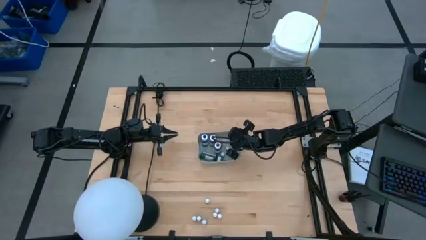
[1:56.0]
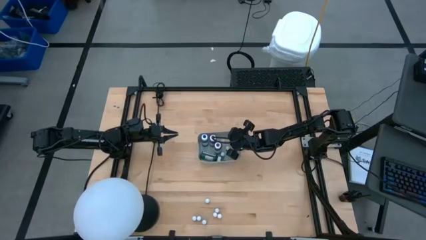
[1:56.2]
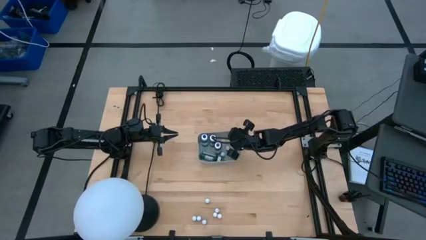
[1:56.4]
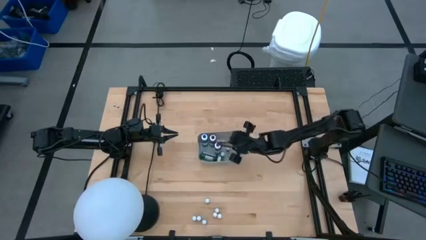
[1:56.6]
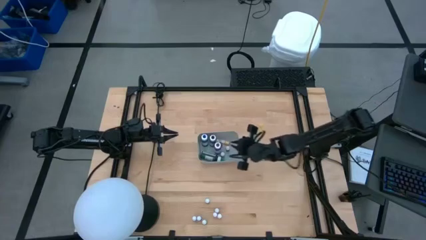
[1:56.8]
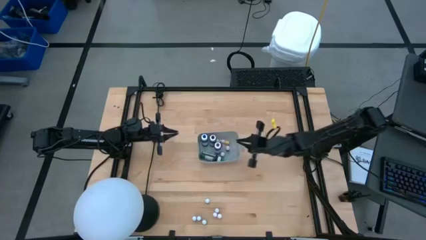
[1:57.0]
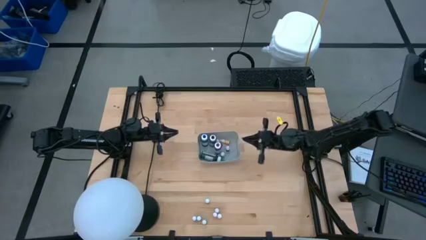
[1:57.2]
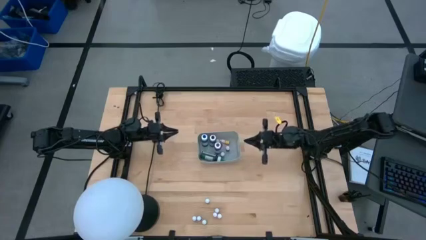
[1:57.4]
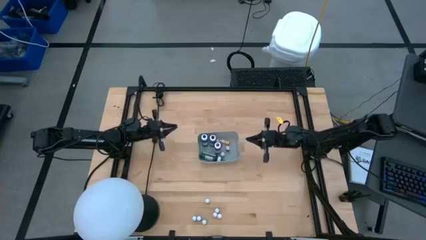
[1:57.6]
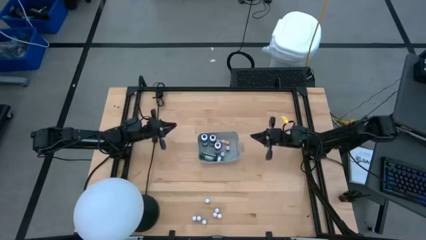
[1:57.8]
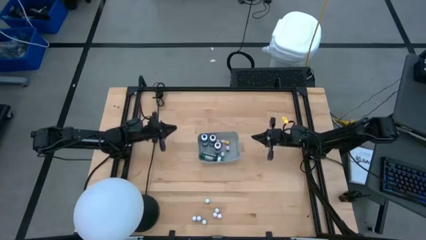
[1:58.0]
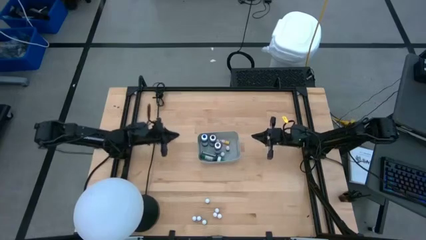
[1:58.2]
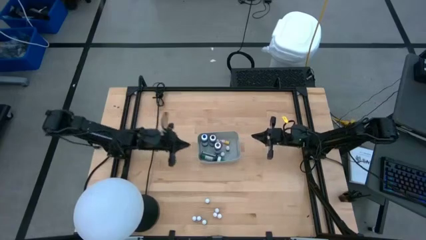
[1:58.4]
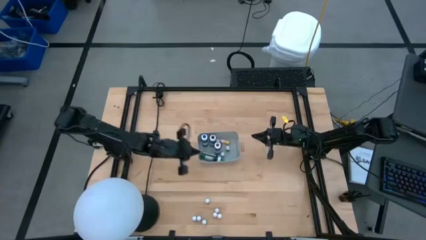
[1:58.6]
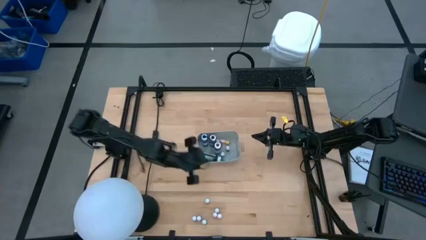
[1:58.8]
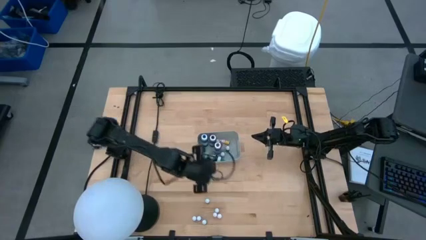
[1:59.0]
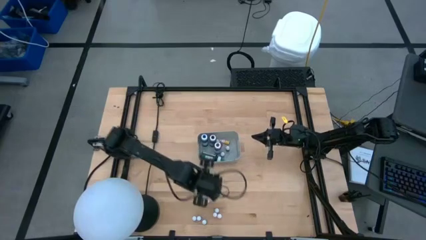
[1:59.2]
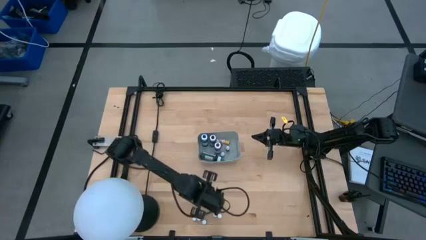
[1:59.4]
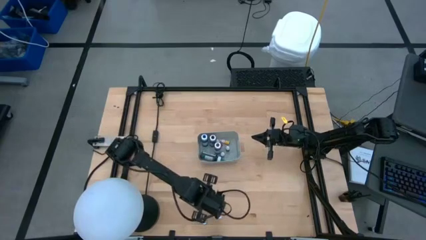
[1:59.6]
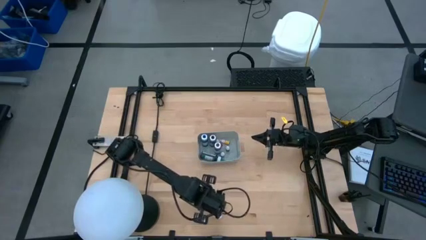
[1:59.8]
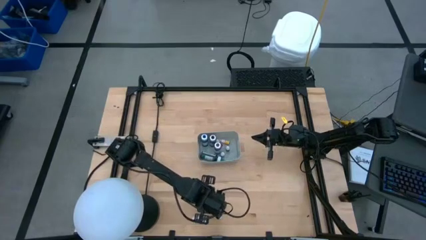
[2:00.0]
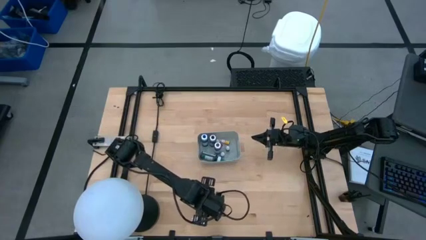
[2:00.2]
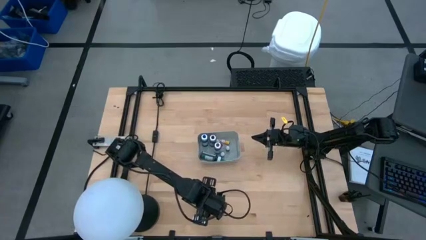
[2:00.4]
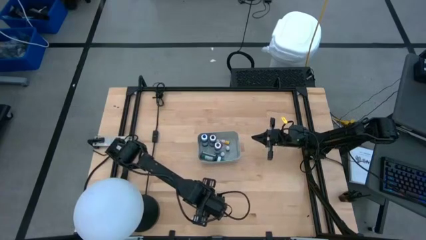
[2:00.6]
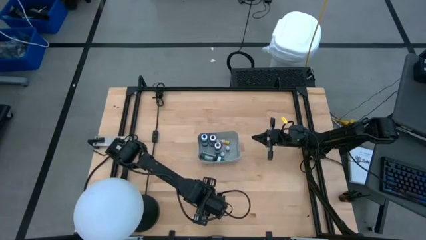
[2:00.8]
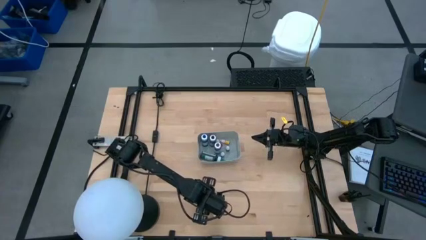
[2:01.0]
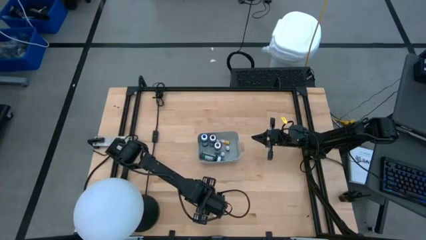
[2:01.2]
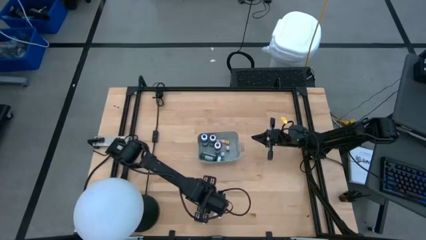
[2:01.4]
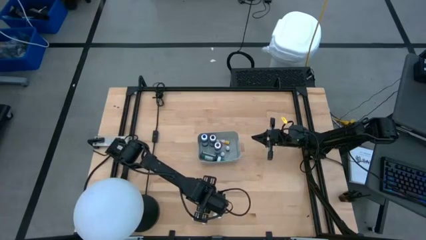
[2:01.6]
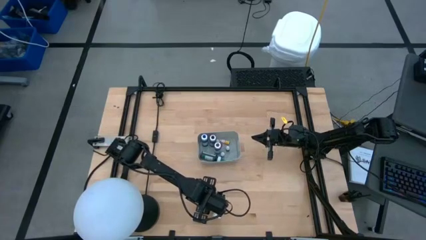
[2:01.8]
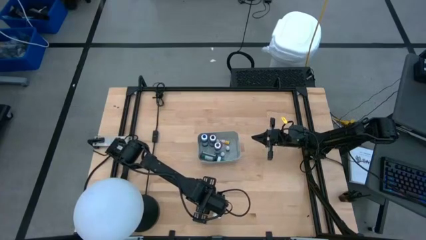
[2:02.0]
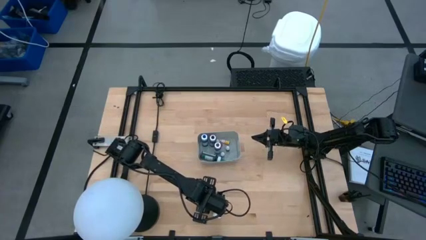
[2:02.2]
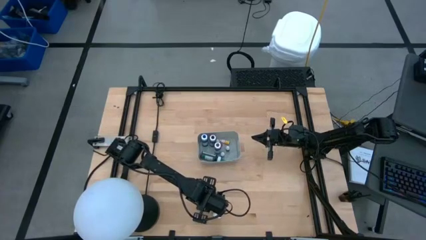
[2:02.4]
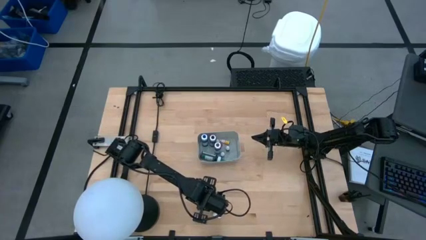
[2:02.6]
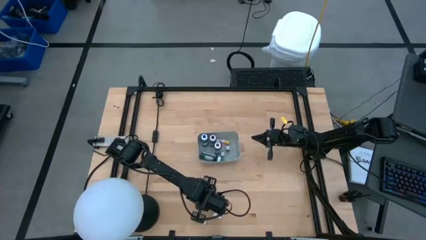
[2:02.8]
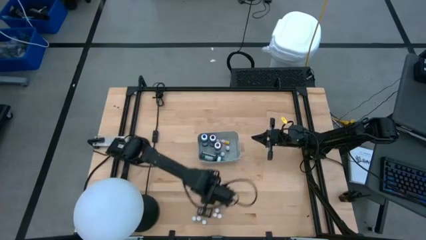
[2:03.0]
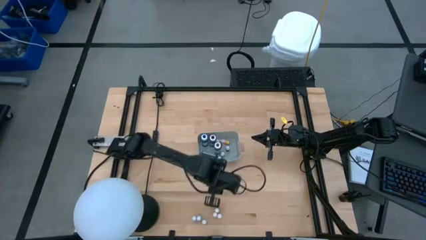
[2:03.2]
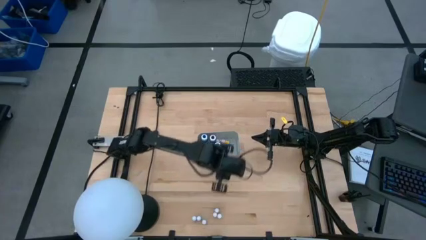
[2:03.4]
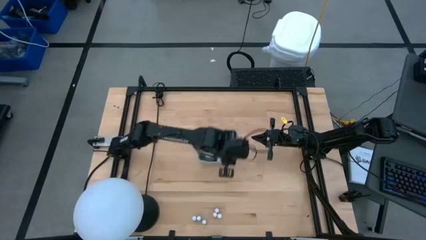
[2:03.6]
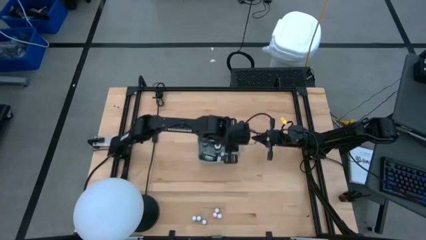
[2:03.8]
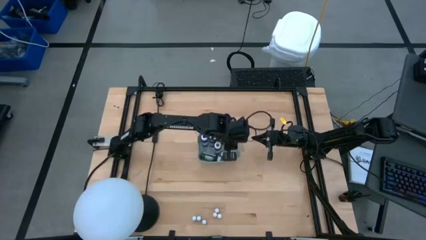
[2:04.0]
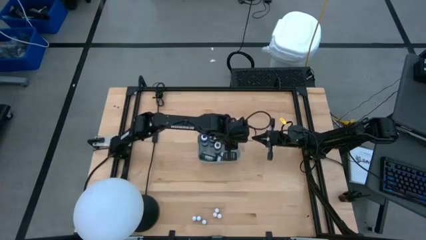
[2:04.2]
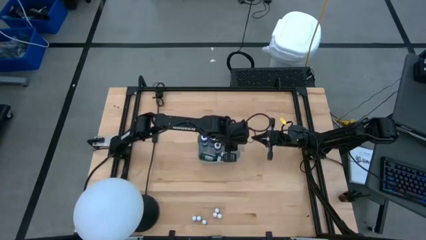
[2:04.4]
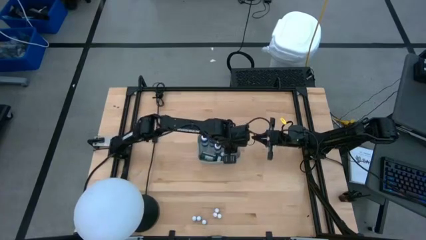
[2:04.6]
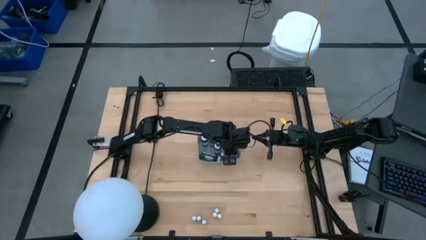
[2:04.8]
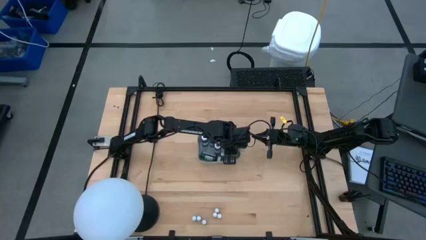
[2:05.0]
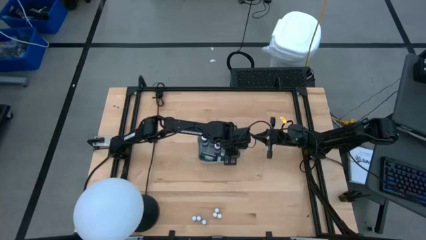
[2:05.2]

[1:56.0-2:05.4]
Task: Pick & Place food coloring
Put the small purple food coloring bottle into the gray bin

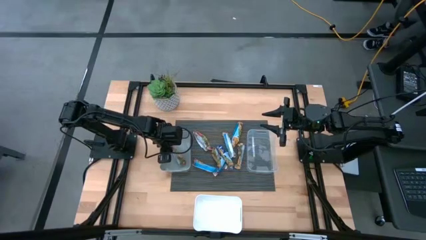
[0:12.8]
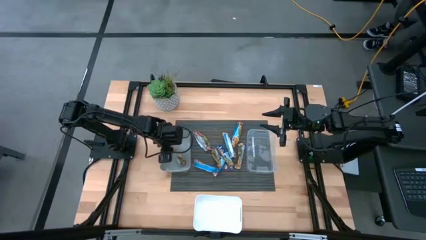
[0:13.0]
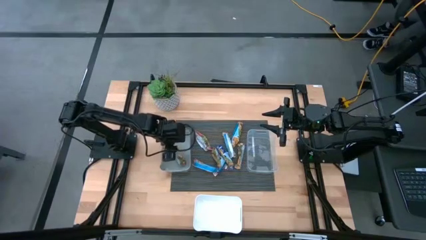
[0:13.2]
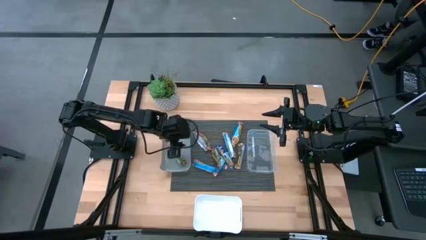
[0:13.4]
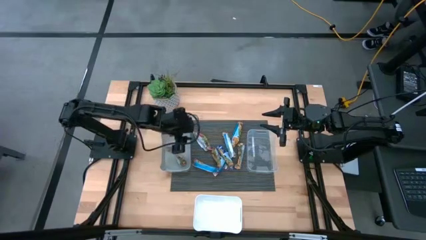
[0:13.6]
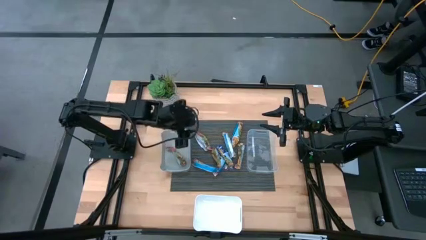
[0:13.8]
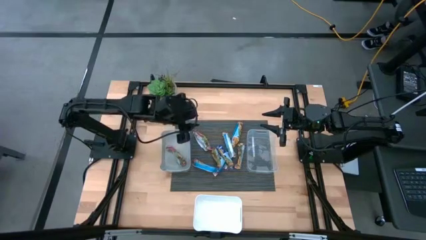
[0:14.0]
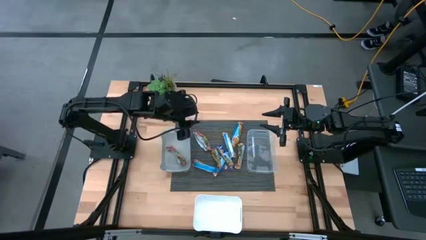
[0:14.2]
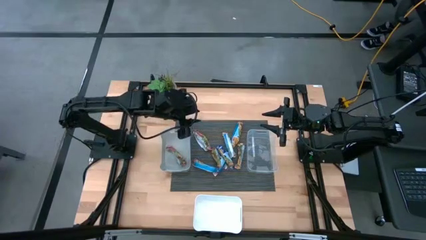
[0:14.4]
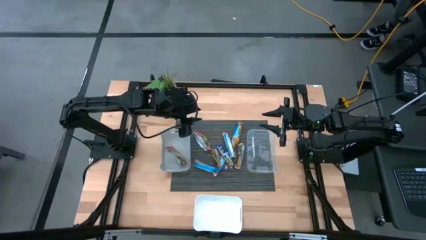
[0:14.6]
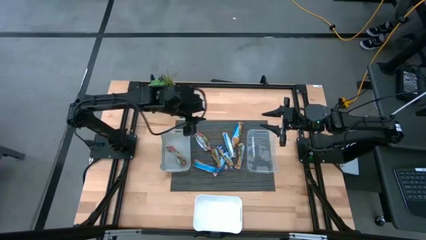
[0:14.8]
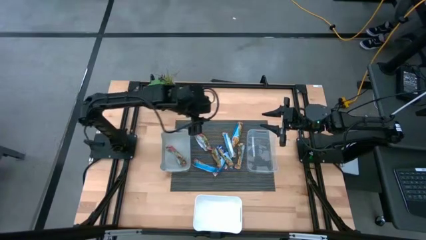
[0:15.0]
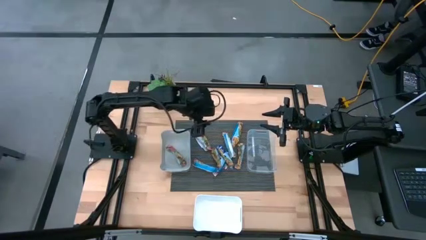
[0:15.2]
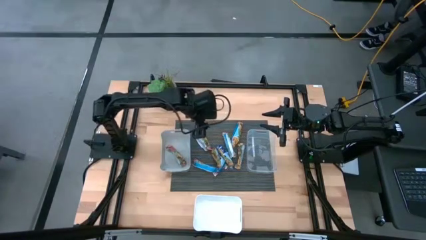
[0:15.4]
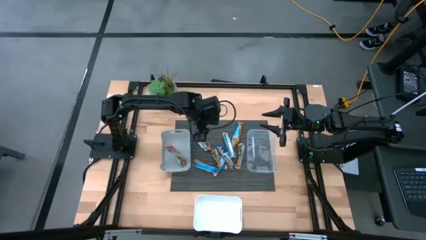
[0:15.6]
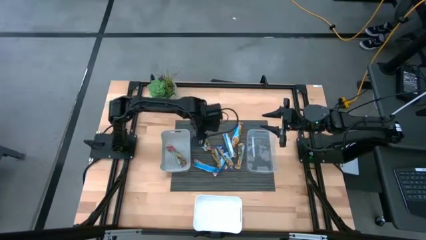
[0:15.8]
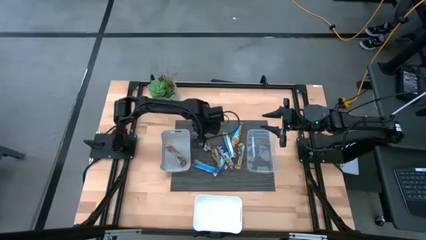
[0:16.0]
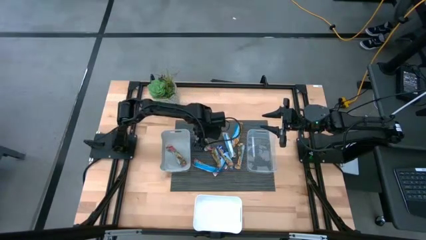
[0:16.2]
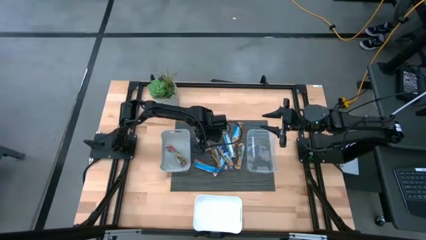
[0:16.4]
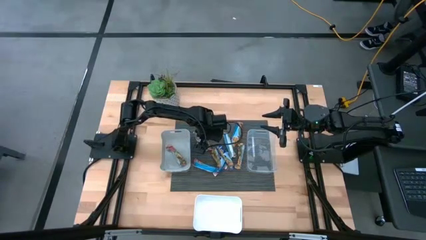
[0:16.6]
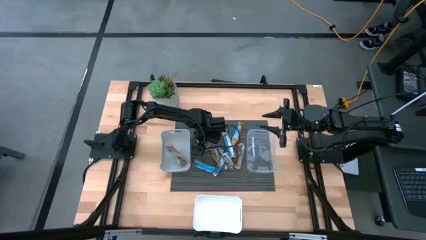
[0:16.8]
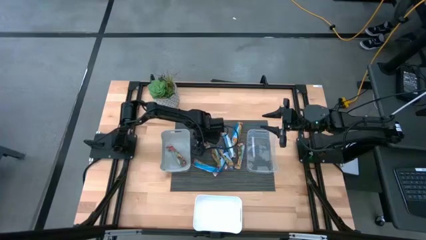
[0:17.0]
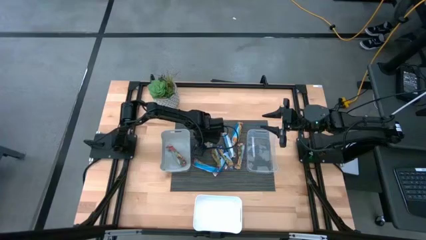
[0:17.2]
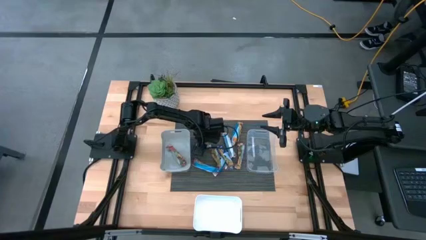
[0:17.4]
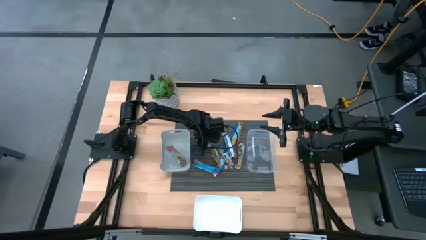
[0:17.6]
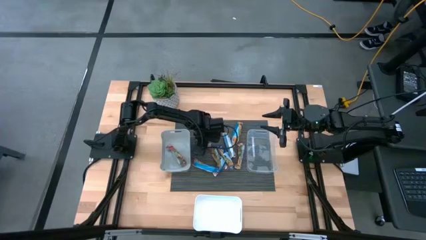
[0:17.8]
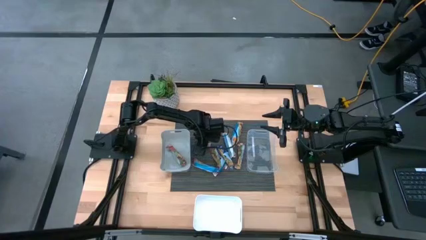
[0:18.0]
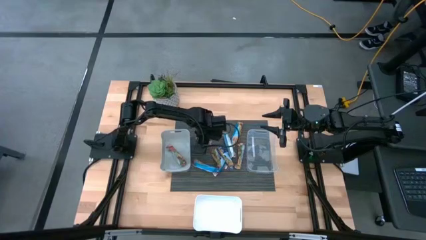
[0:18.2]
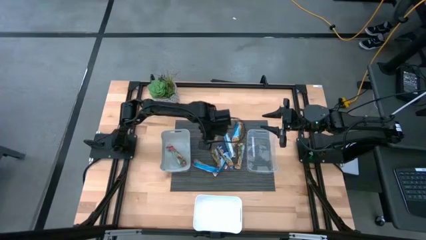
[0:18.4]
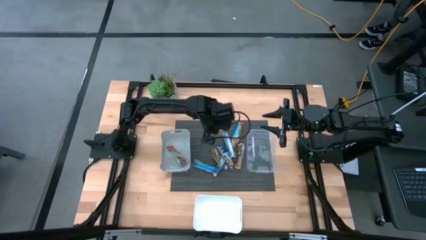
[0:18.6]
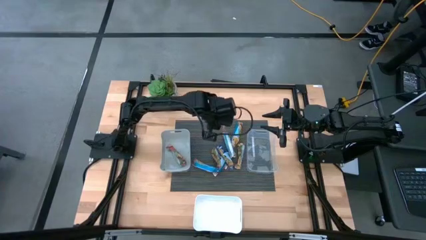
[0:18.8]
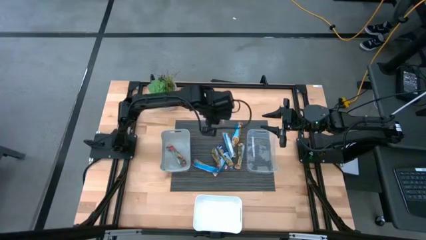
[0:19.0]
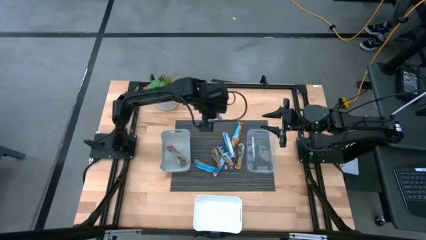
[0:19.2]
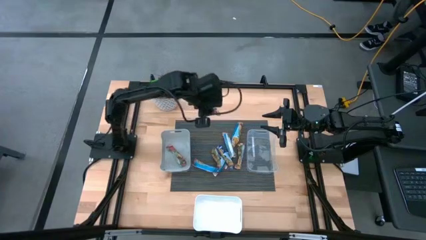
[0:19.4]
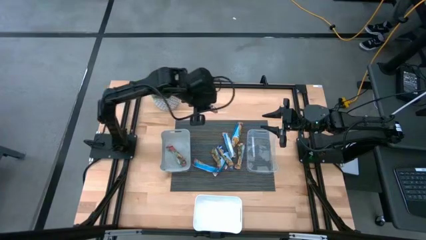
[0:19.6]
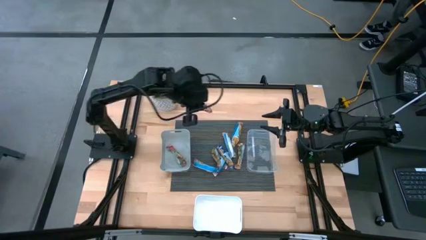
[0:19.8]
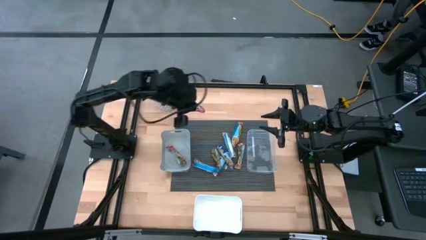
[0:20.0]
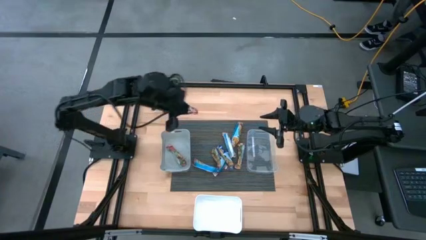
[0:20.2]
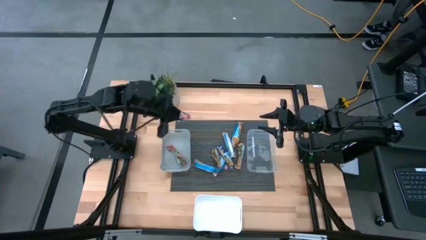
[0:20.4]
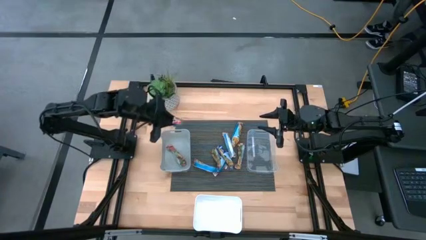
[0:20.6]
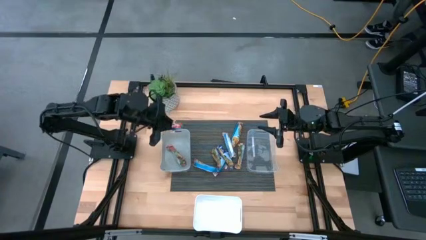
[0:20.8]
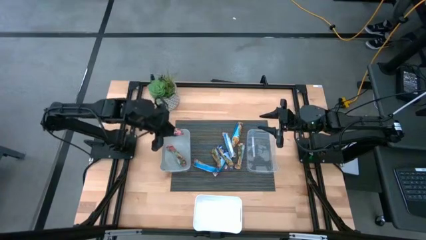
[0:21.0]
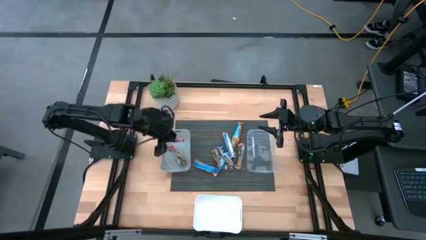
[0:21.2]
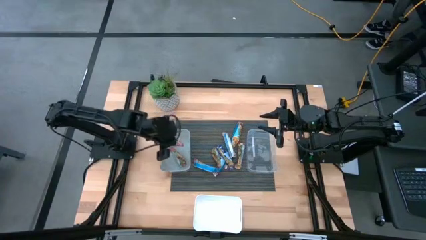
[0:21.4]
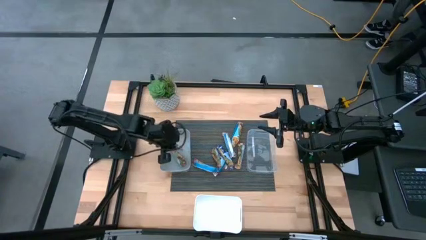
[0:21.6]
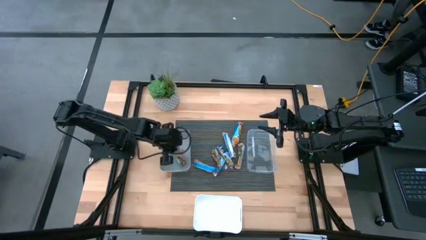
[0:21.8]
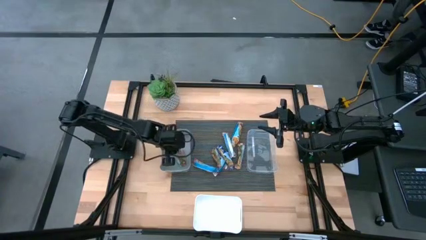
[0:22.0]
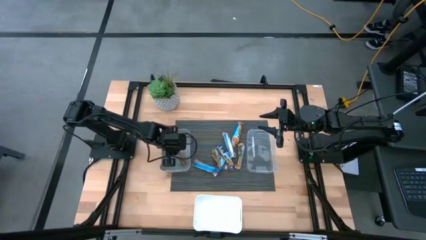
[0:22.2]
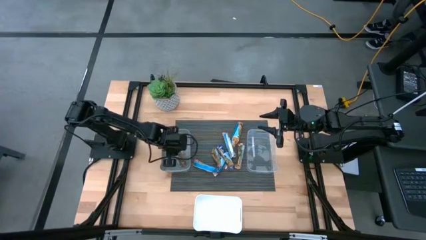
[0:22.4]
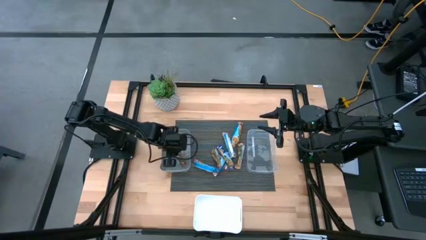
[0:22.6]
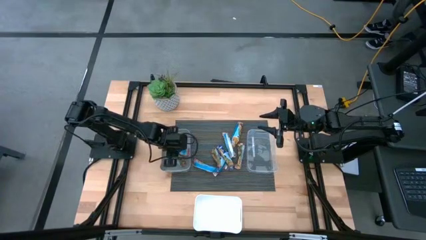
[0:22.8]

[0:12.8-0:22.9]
Task: Pick and place Granola Bars by type
Put the red granola bar into the gray bin
